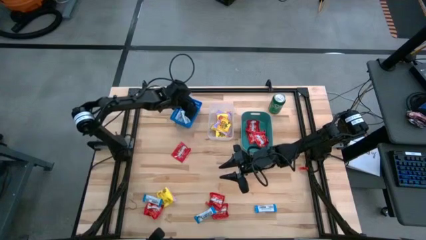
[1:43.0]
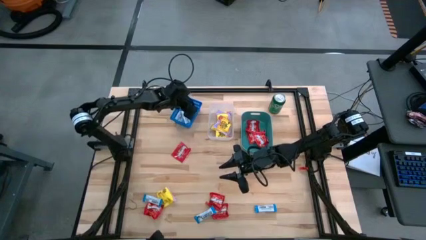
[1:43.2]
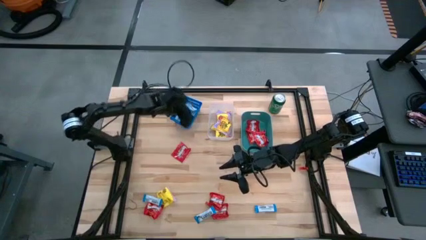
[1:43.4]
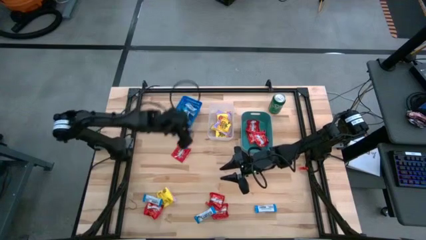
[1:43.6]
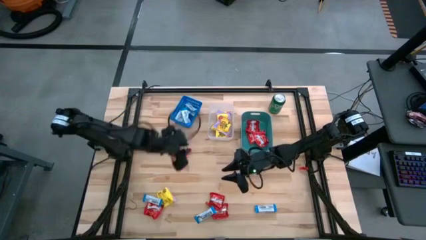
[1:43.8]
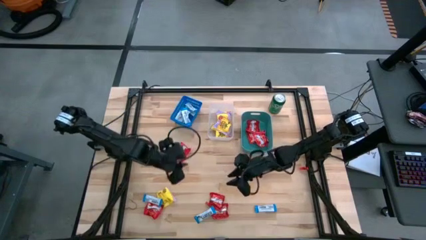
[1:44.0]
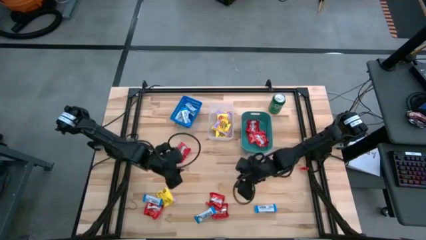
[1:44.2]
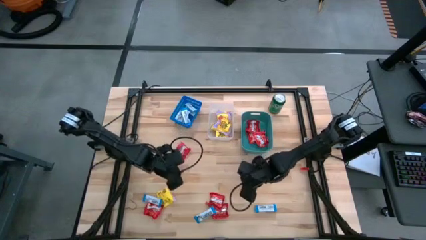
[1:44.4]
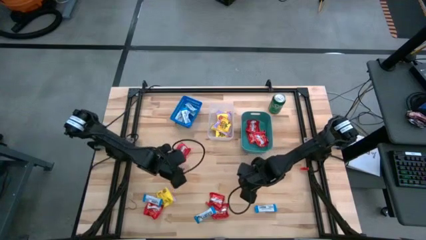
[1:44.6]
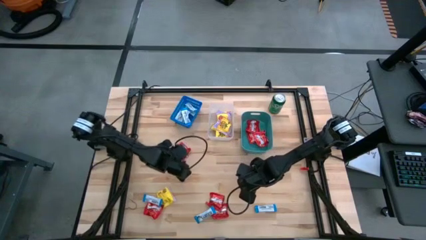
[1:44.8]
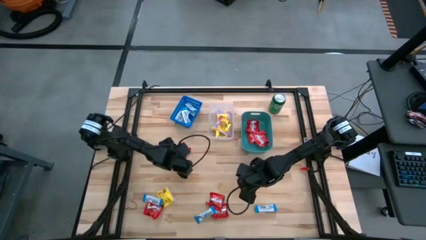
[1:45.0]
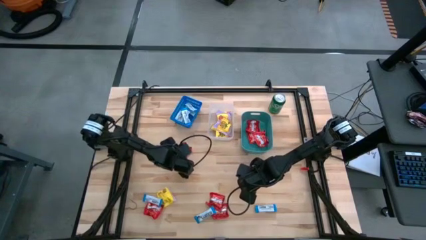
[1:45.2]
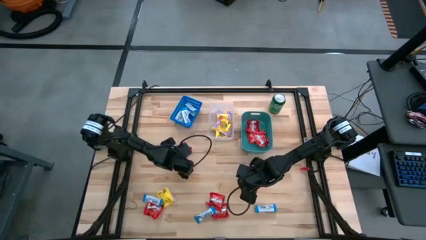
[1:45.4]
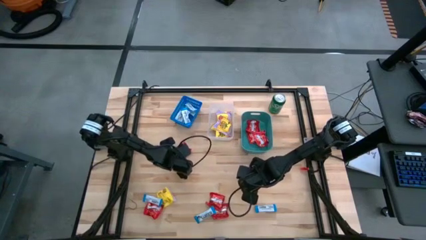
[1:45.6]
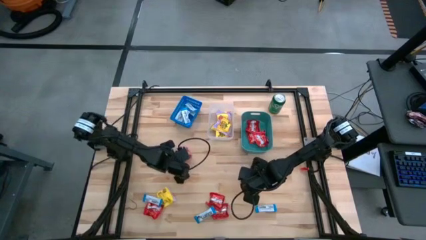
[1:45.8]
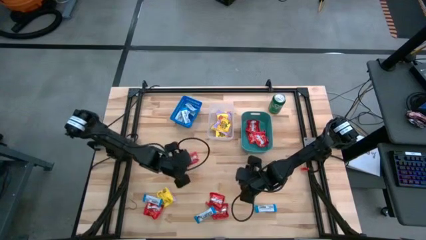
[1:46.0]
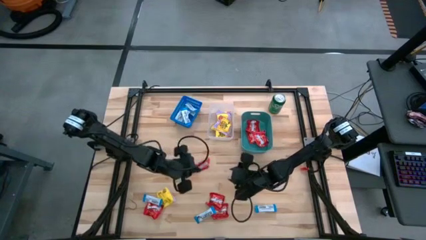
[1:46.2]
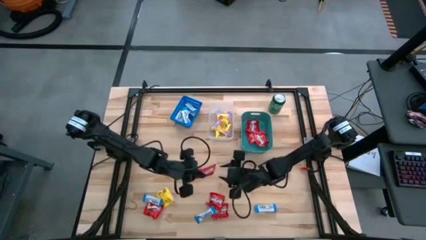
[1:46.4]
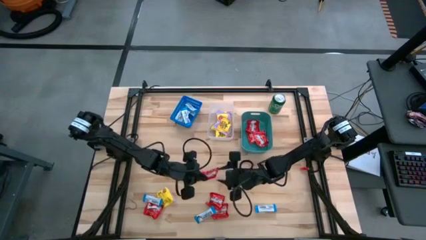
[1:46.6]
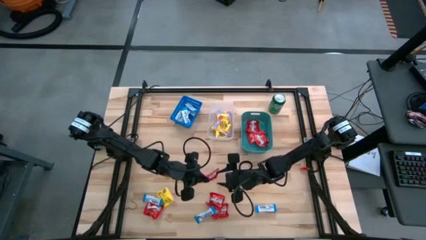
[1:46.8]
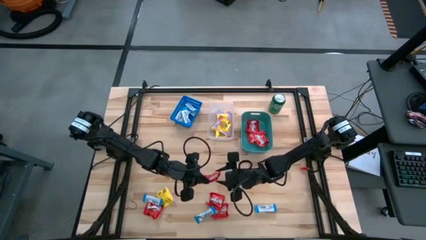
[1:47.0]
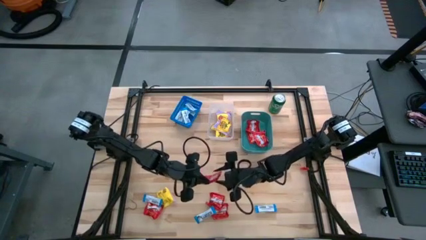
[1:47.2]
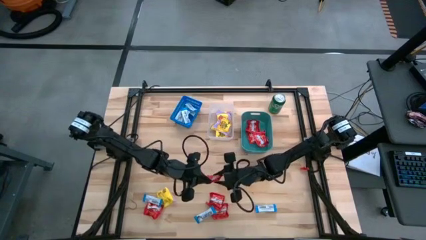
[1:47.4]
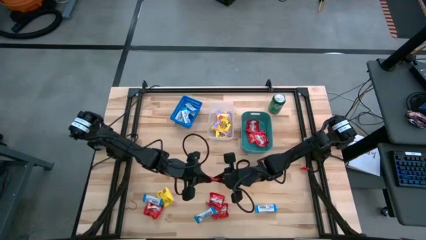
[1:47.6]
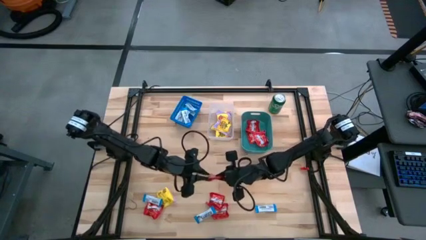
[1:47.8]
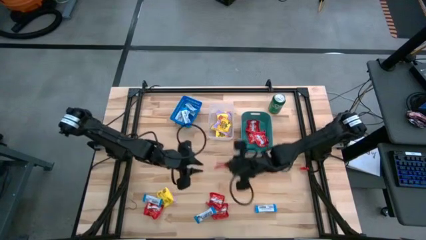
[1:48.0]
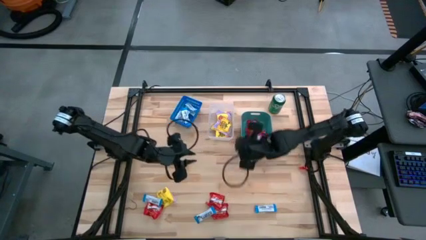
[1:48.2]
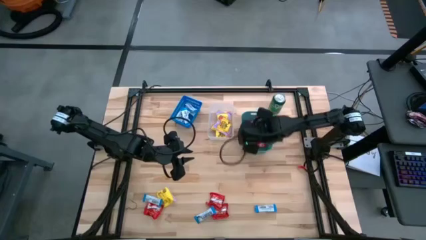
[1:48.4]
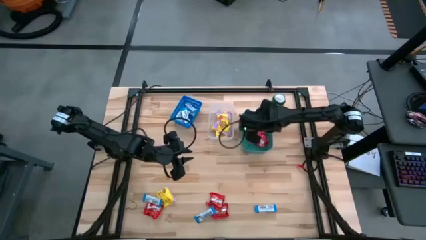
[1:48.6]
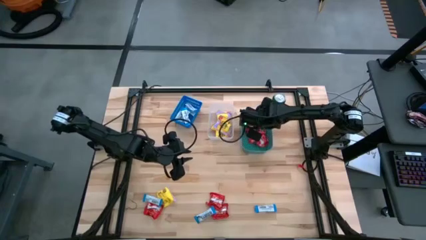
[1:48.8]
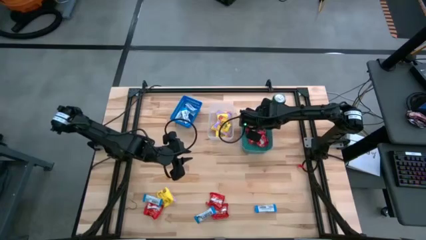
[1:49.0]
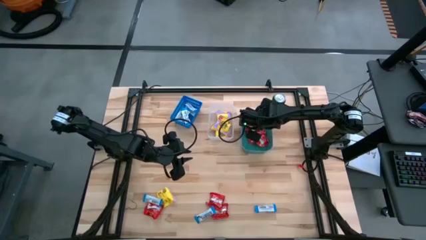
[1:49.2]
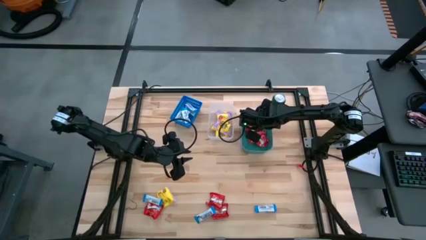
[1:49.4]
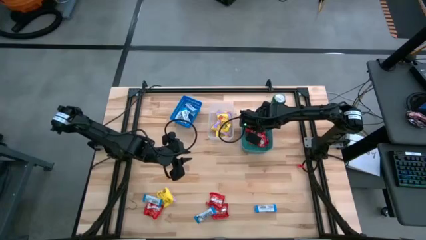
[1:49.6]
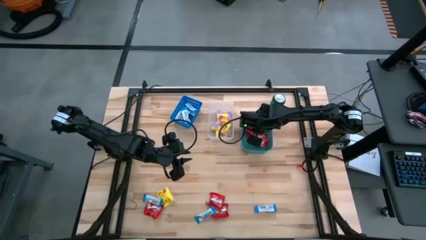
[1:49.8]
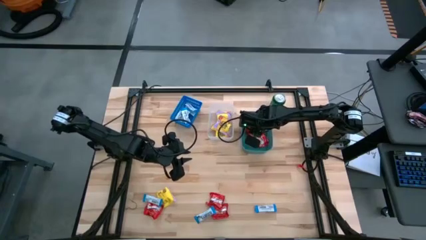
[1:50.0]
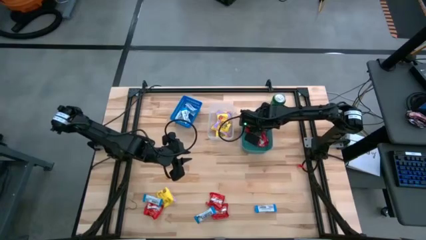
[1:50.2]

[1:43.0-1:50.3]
Task: Sort candy
Put the red candy into the green bin

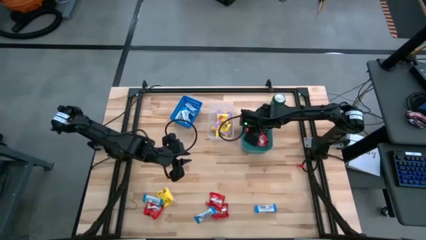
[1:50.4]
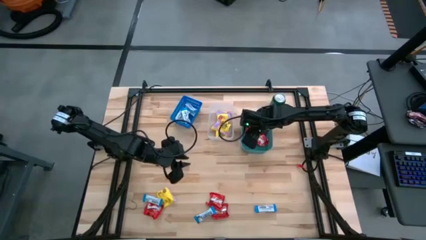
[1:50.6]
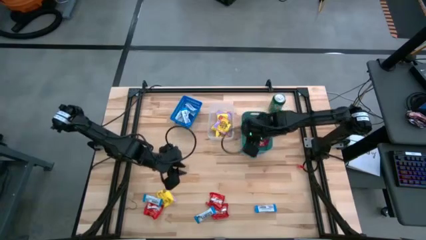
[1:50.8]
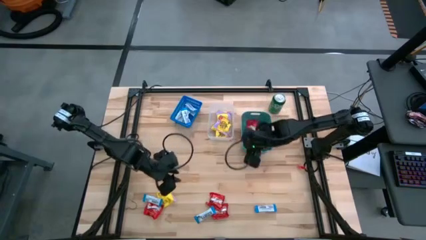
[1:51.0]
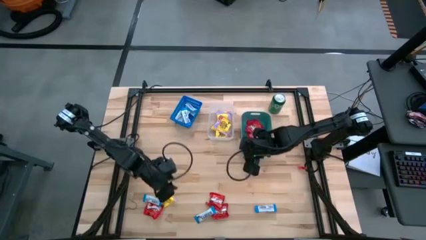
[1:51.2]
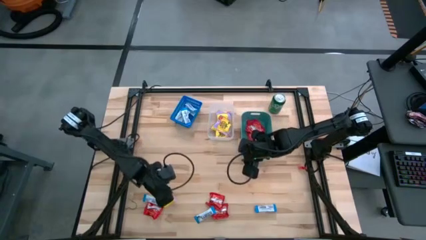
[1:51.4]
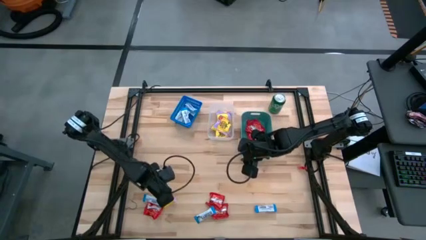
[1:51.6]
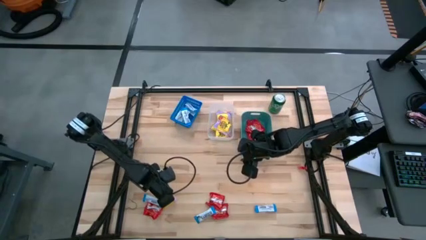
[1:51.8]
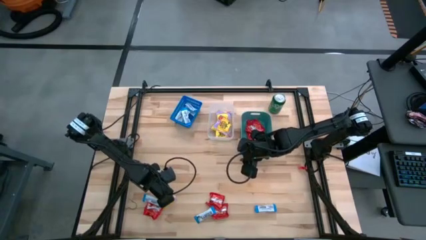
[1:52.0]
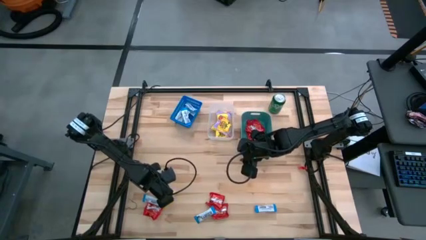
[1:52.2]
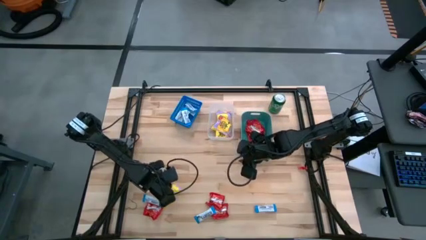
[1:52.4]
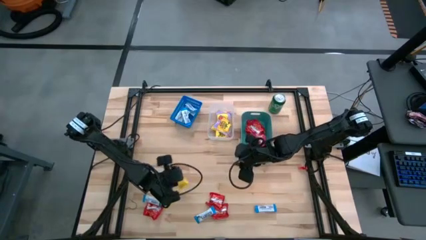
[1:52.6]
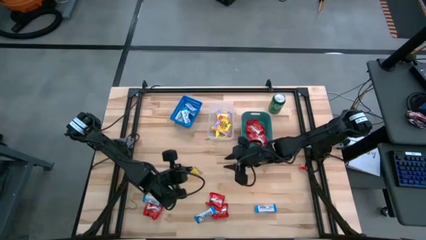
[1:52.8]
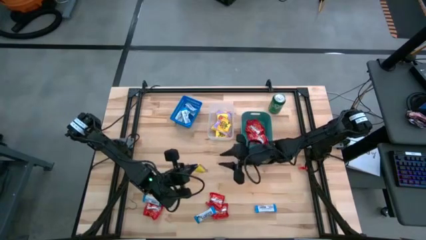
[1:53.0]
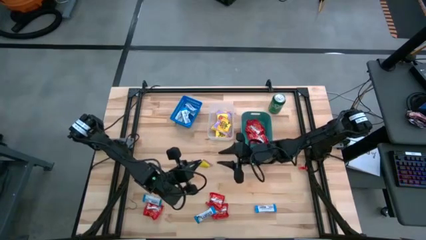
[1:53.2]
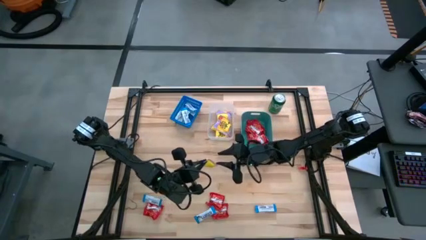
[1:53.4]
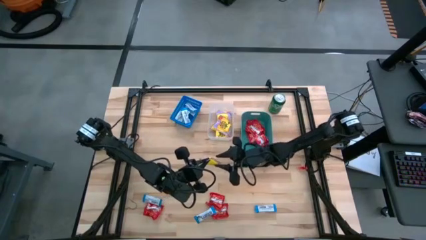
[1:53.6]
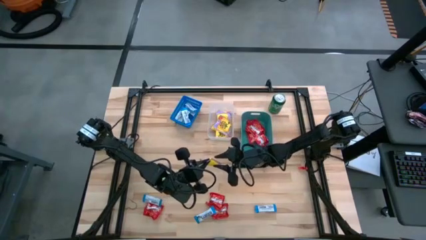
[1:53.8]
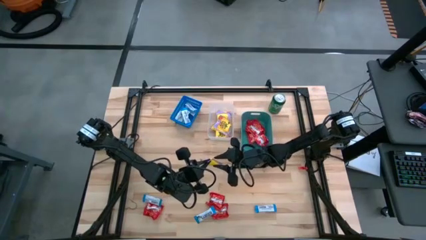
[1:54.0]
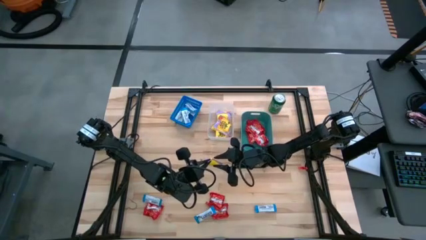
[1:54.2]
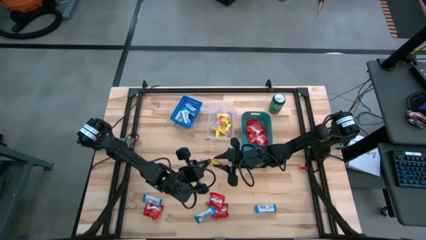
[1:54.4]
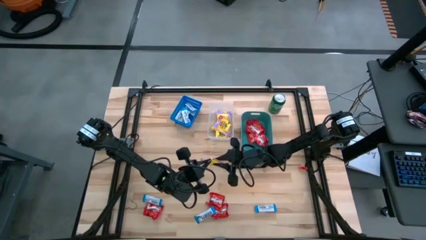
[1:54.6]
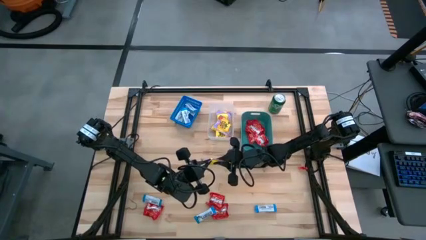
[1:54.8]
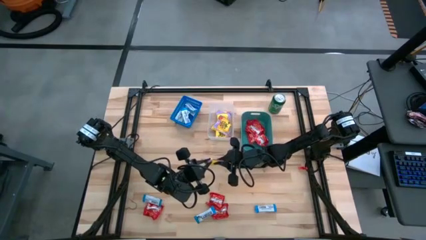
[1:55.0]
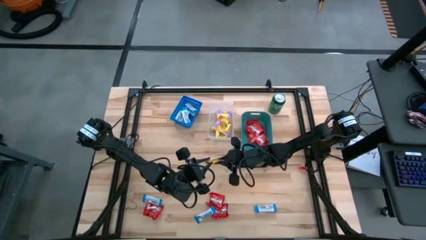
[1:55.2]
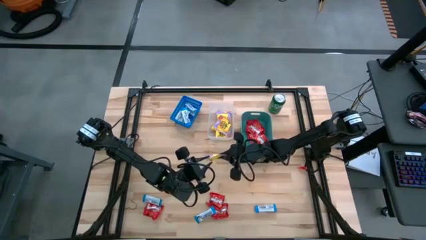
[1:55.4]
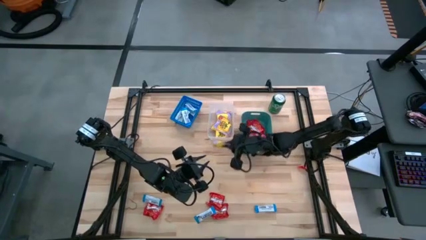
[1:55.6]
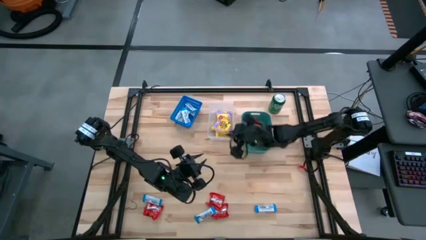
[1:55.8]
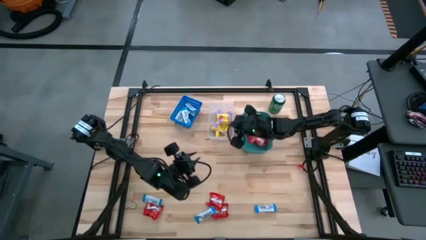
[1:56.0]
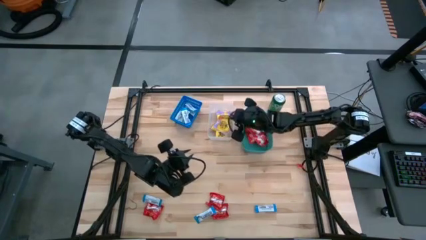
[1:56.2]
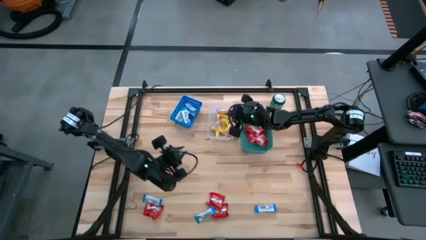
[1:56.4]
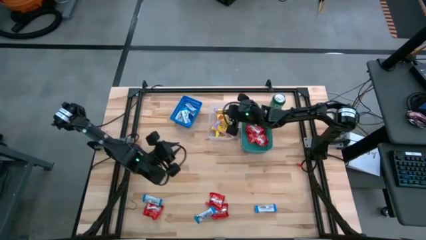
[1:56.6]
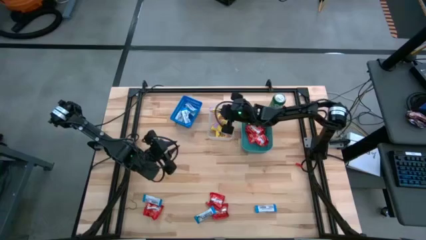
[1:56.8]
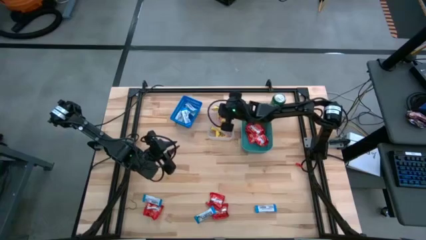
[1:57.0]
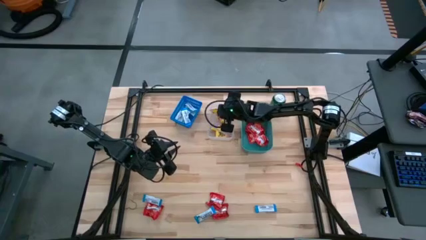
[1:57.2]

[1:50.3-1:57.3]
Put the yellow candy into the transparent bin

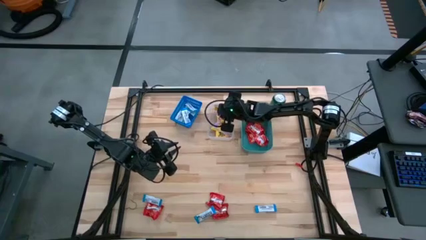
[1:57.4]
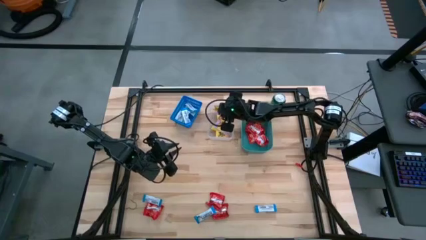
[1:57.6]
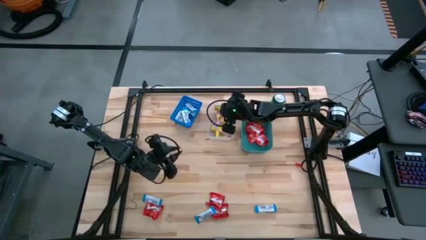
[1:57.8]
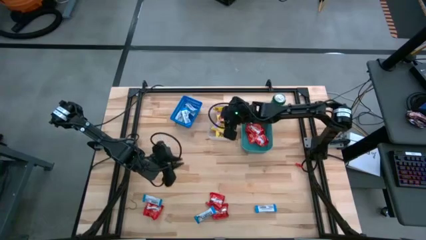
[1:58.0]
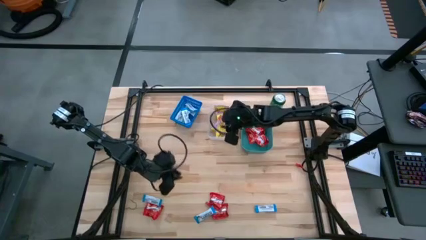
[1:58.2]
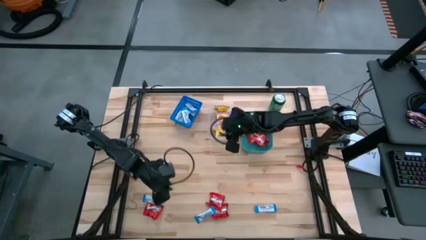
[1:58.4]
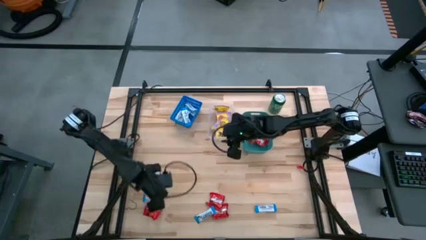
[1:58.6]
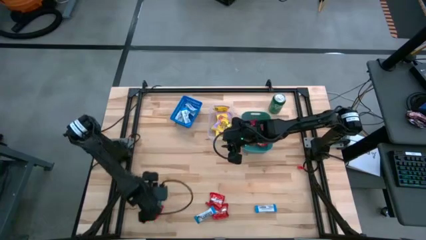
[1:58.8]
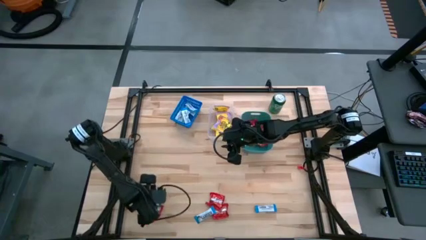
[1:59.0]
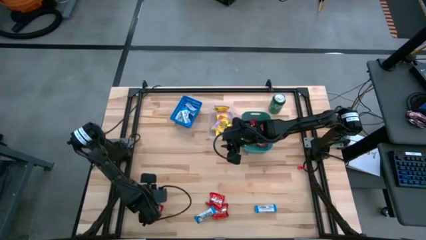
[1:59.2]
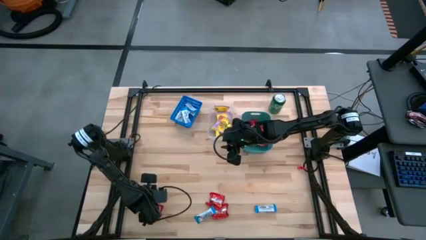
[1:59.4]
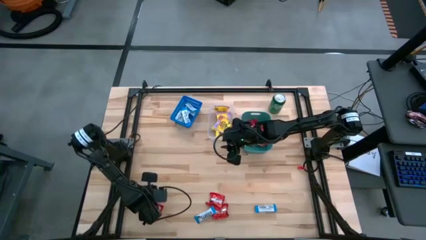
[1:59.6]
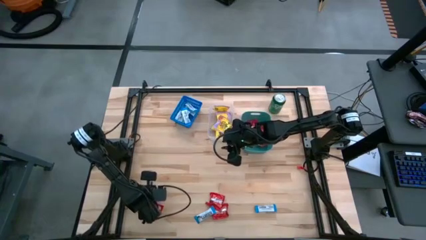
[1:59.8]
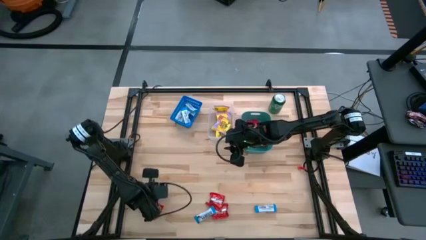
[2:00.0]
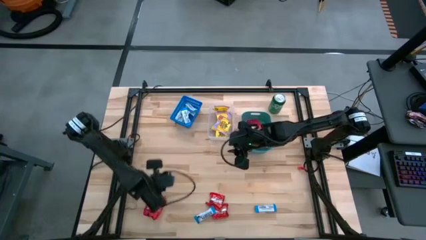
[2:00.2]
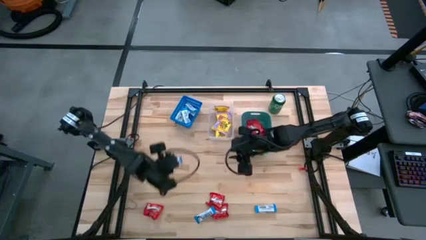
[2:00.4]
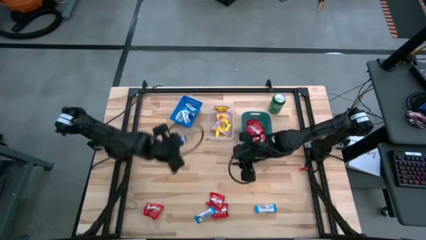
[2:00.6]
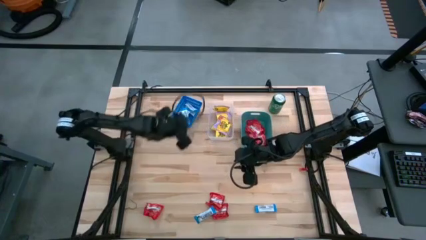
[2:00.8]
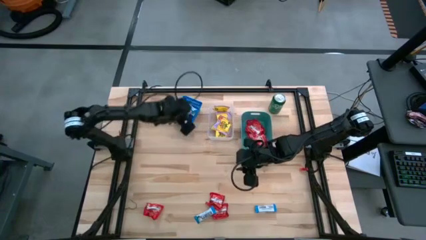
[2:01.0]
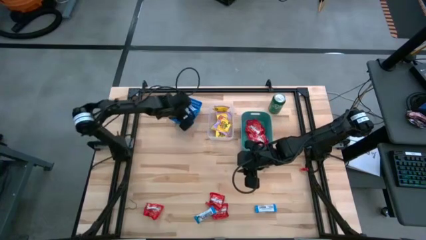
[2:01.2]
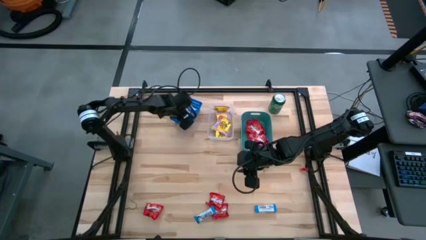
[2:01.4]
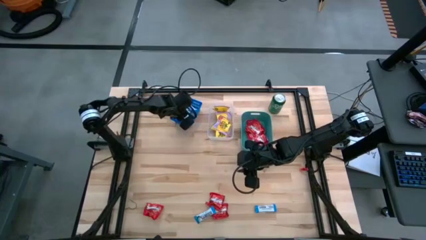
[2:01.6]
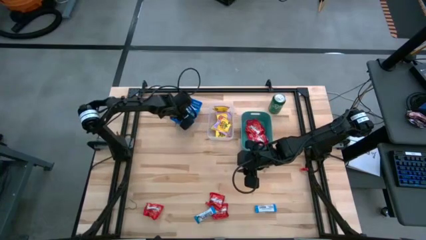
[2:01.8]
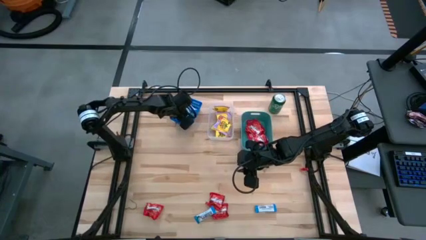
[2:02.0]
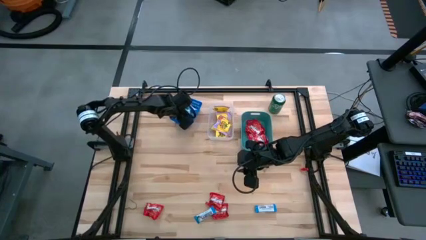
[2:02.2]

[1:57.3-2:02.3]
Put the white chocolate bar into the blue bin
